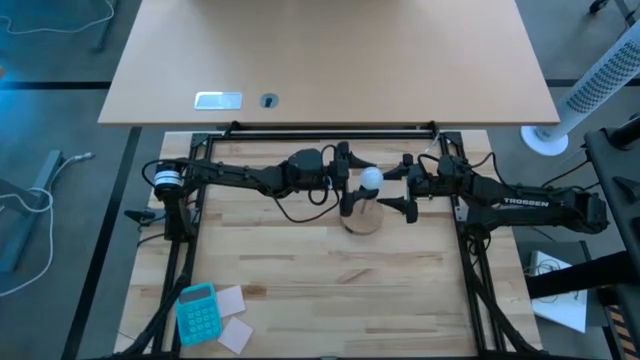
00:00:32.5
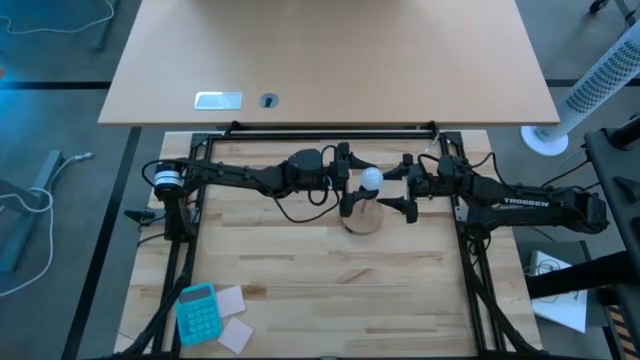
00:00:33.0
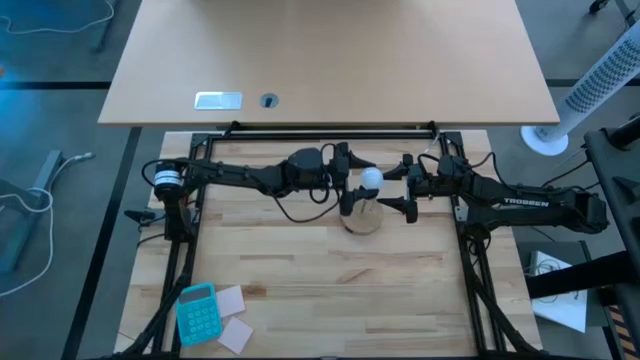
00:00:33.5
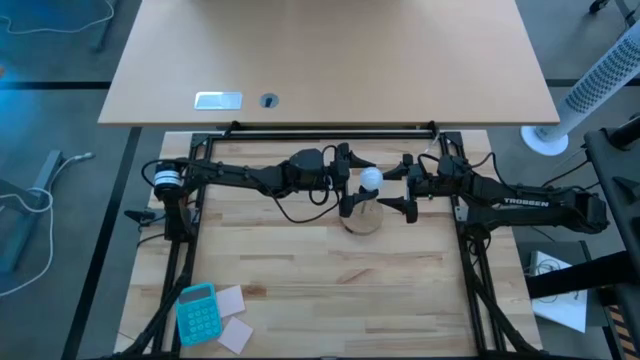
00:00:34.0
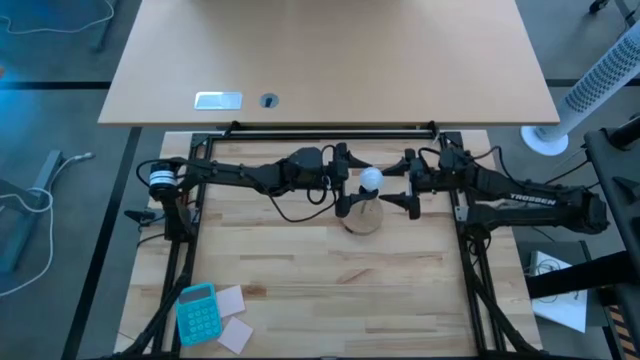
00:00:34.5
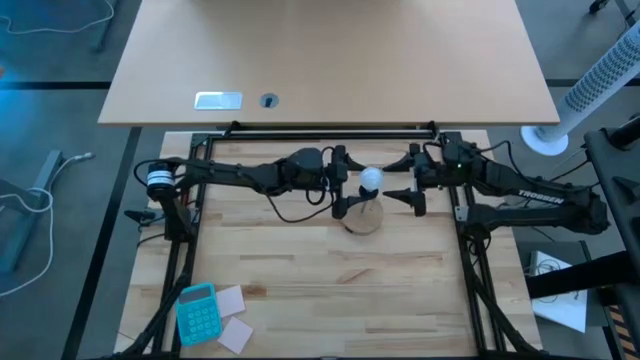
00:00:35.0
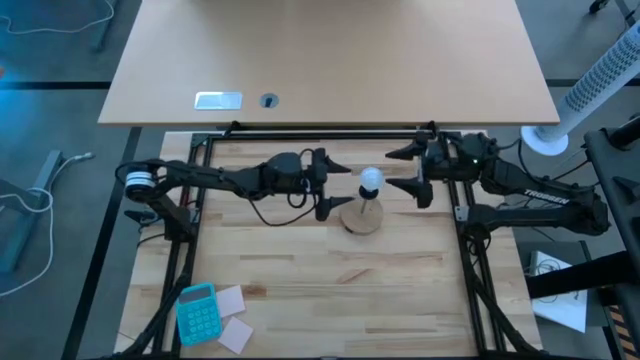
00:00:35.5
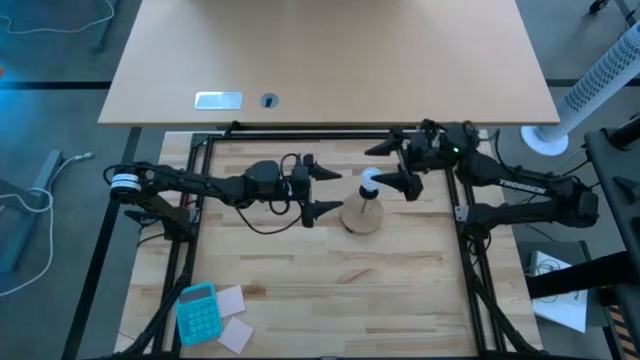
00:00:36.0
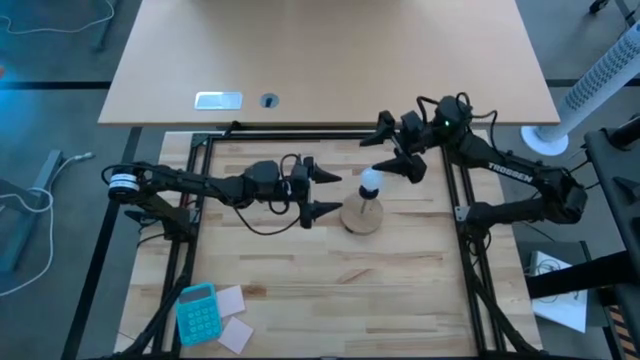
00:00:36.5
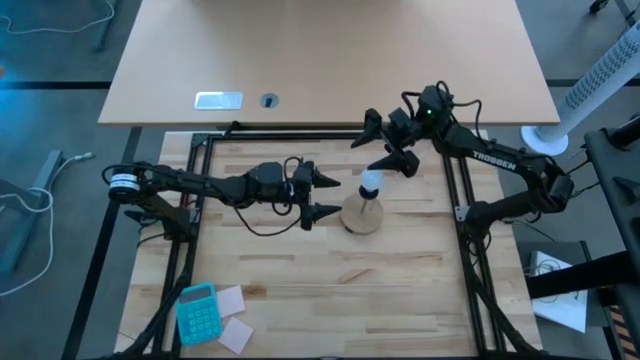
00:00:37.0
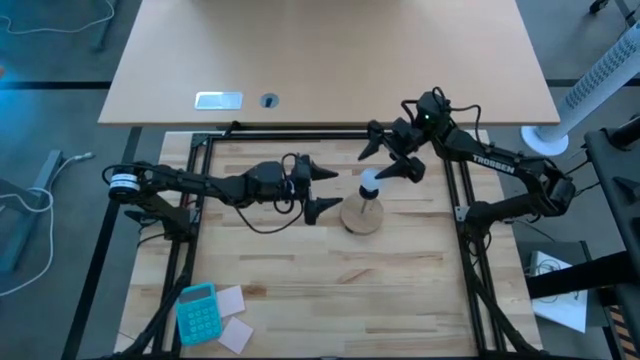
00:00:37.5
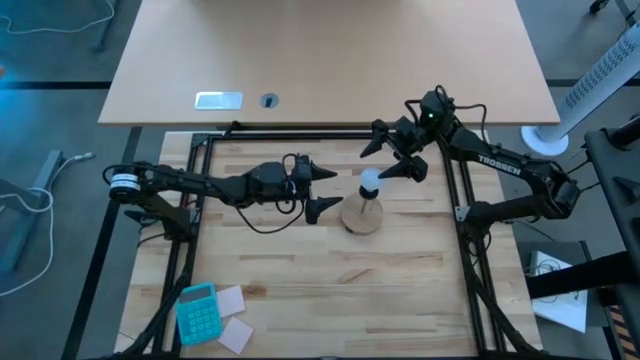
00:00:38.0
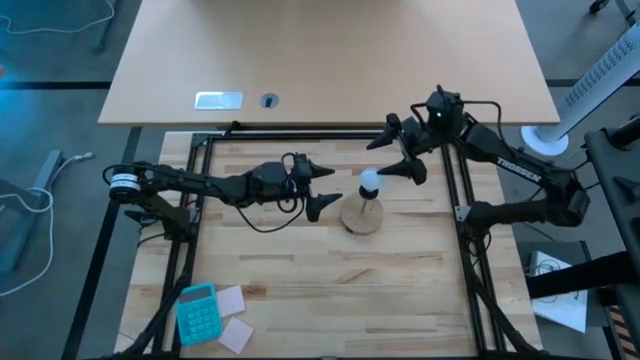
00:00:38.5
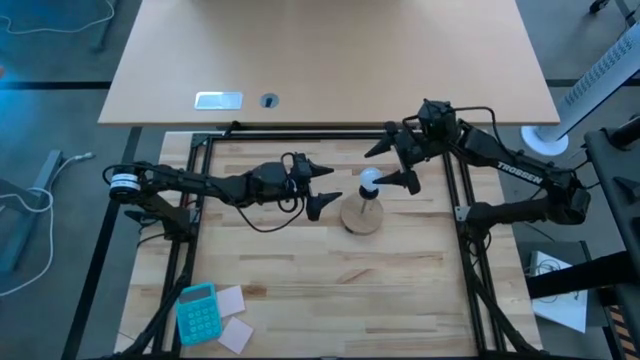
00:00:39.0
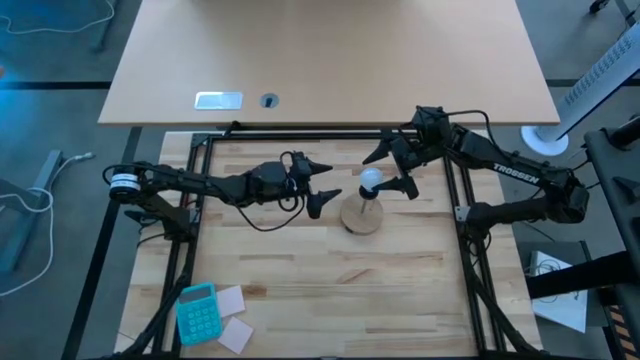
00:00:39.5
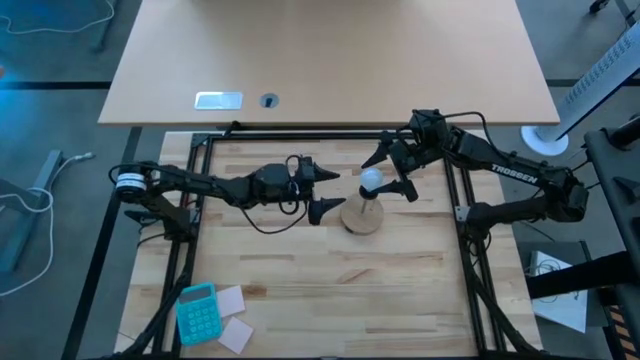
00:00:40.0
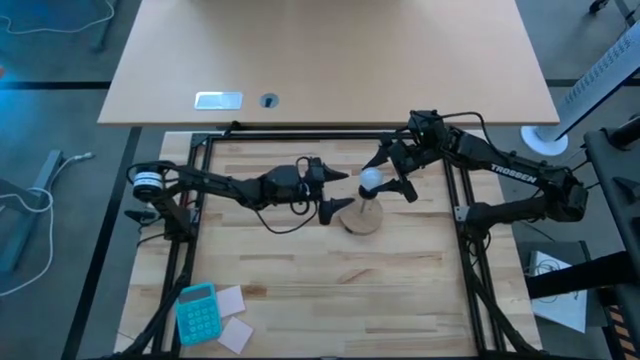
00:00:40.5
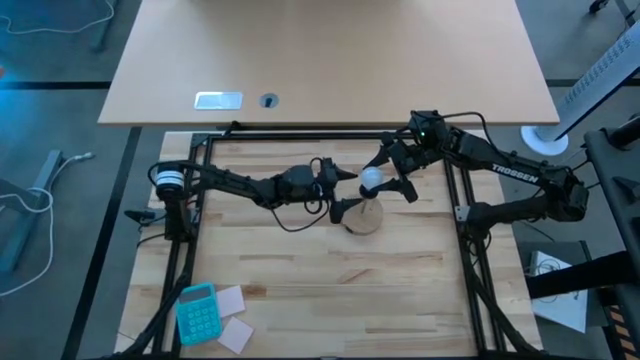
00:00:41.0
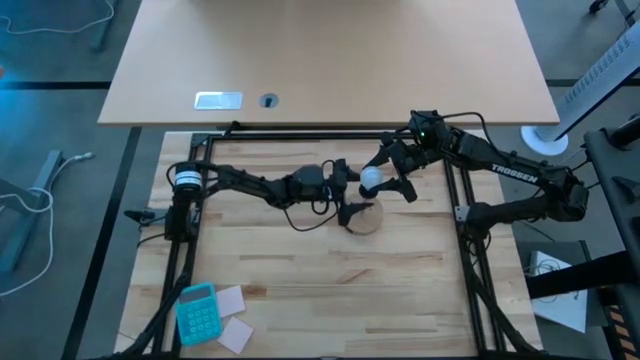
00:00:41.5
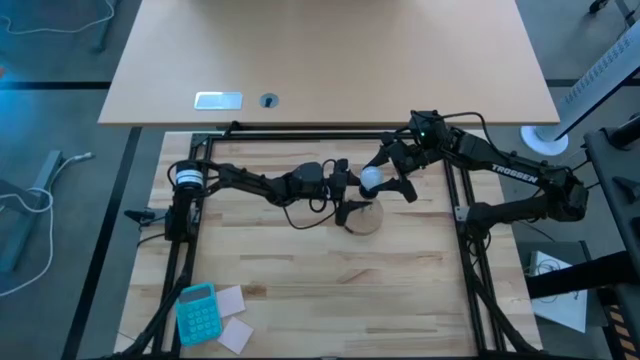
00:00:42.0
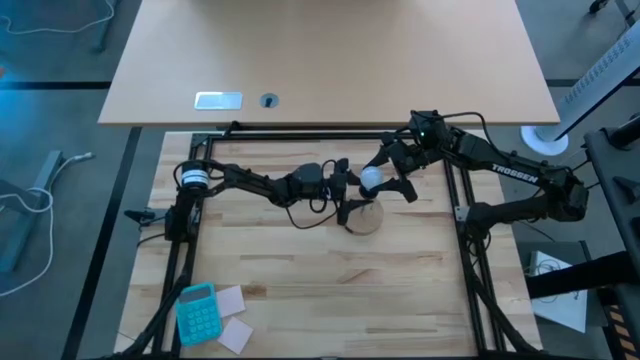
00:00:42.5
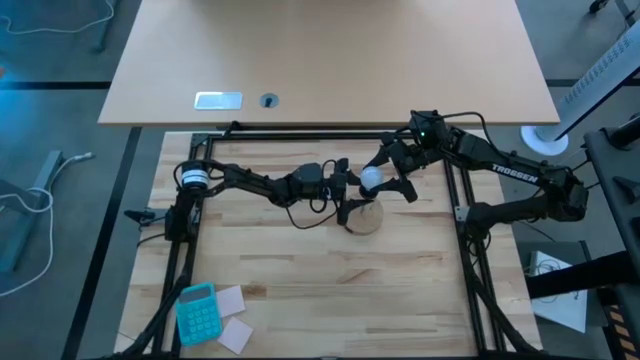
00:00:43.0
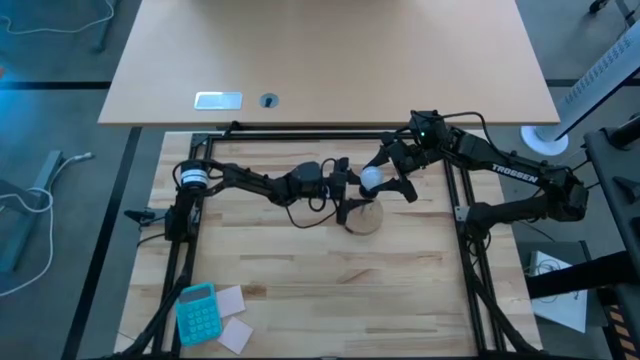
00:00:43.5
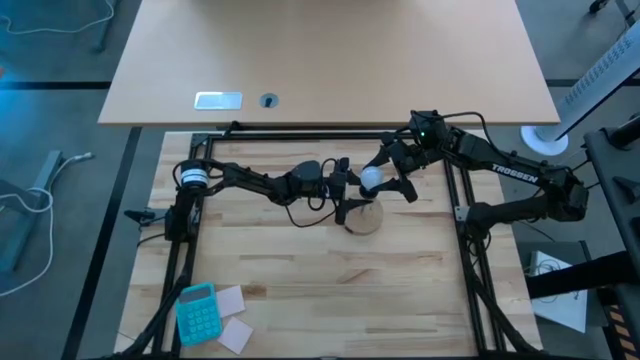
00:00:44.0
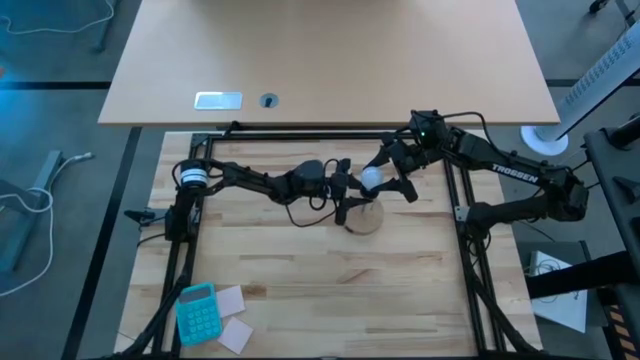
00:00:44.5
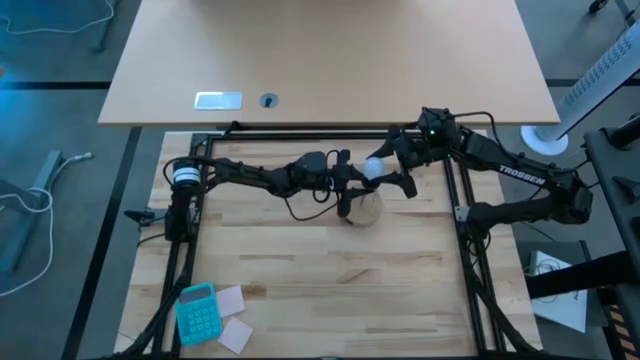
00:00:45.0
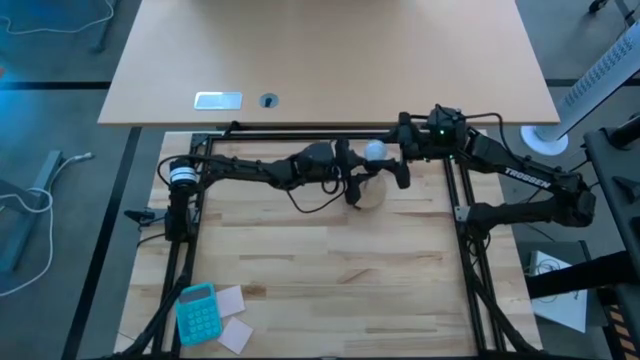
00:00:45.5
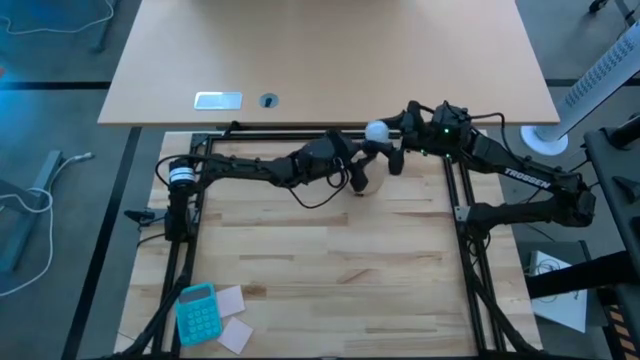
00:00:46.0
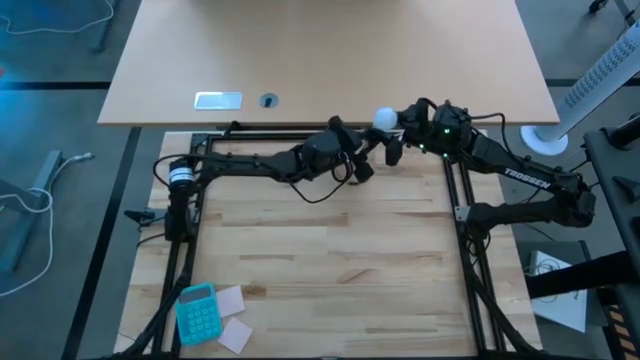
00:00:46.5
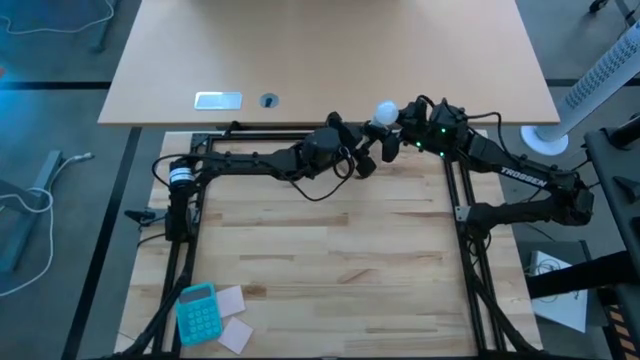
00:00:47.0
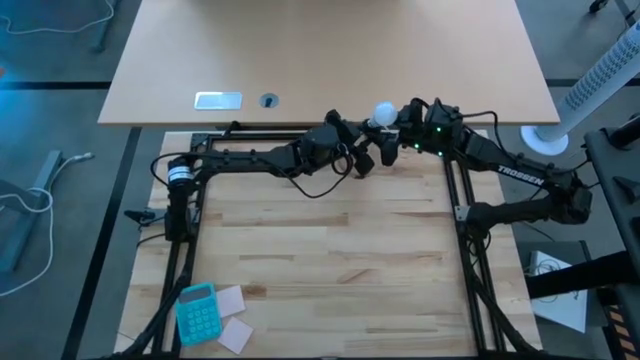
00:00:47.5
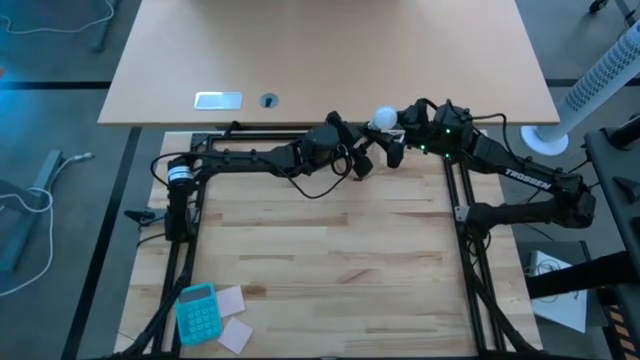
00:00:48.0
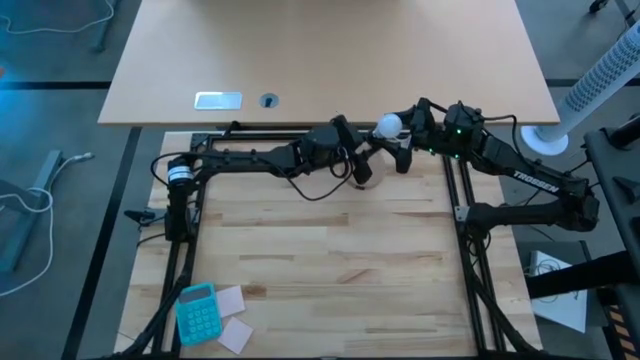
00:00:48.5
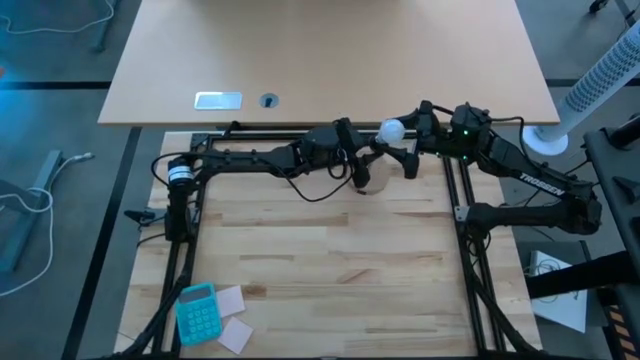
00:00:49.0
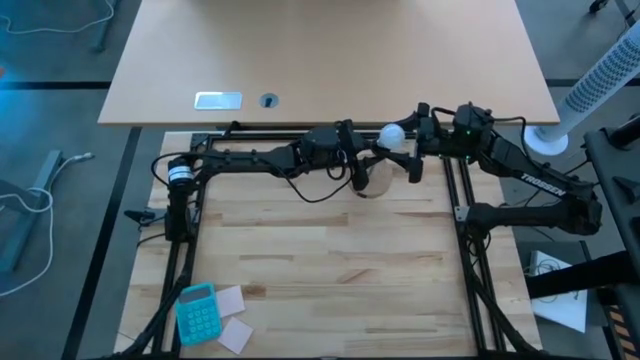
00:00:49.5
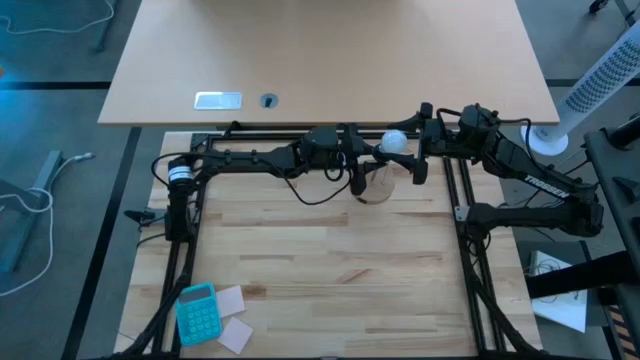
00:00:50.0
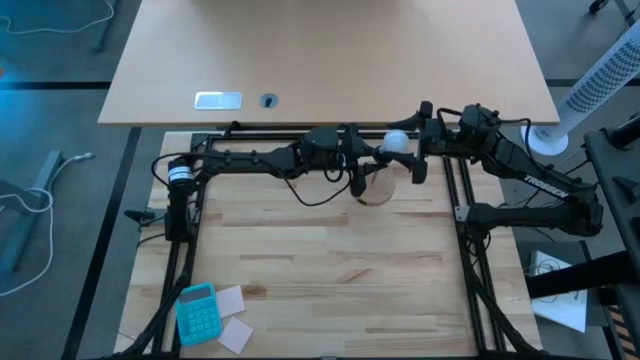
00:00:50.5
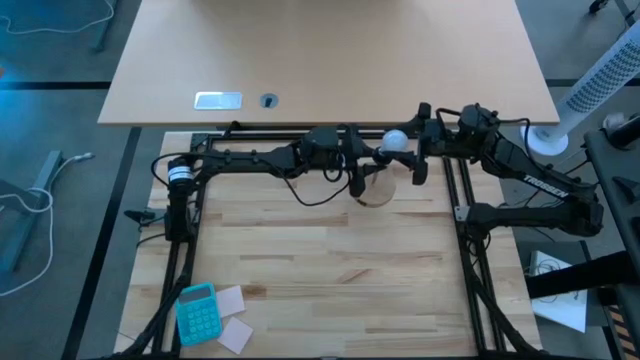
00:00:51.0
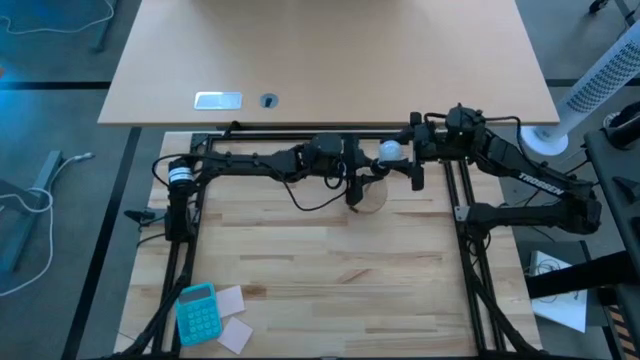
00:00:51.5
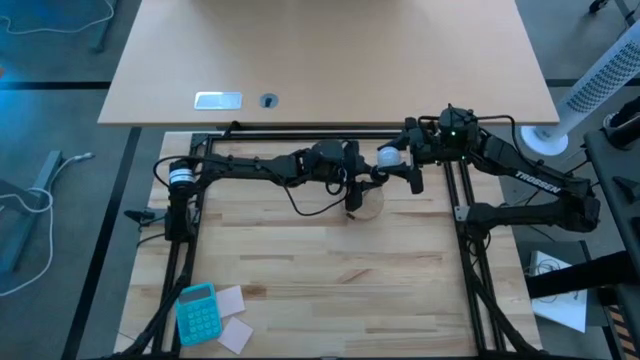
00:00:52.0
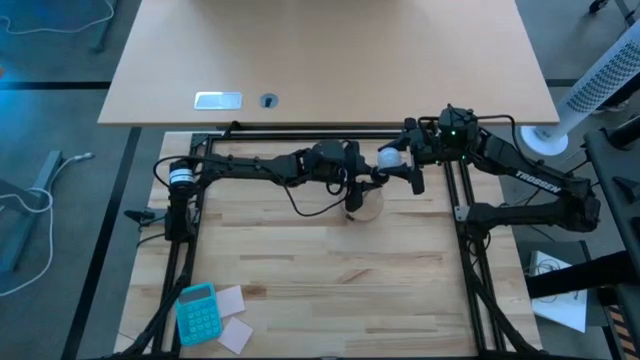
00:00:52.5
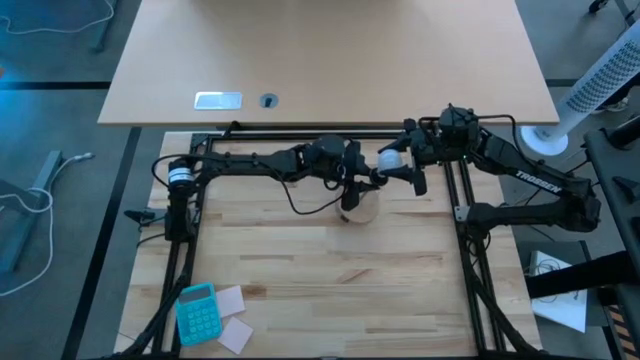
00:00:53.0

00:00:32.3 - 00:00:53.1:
Task: Screw lightbulb
Insert the lightbulb into the lamp
